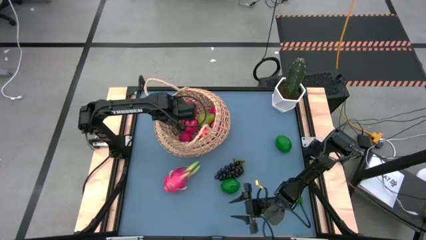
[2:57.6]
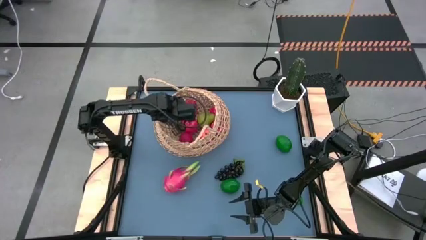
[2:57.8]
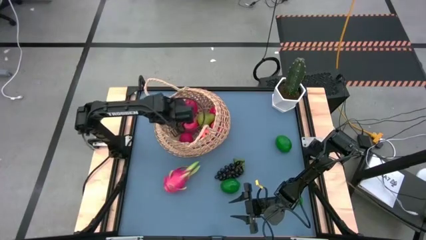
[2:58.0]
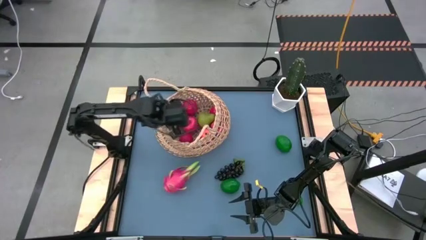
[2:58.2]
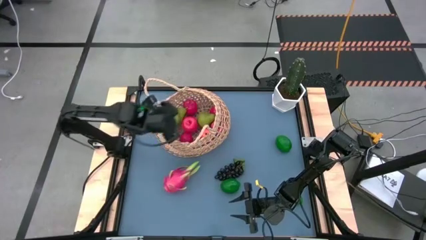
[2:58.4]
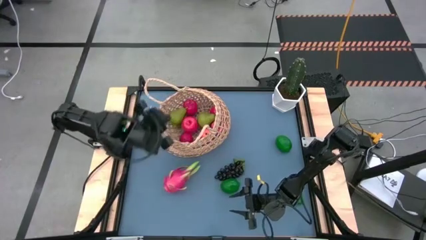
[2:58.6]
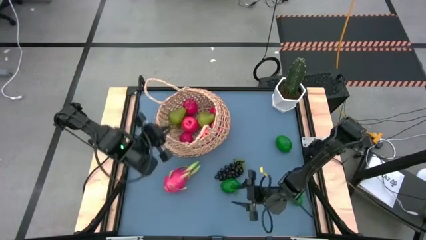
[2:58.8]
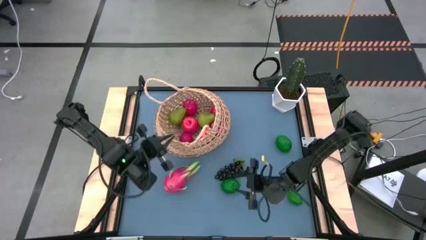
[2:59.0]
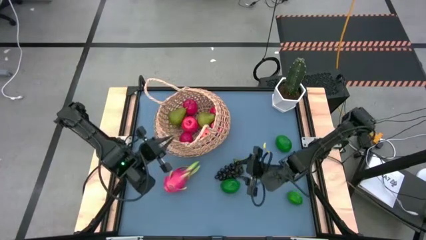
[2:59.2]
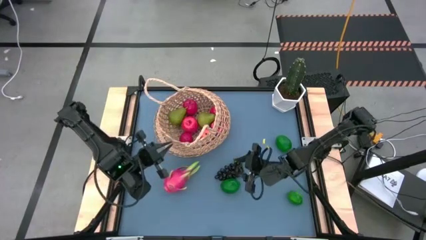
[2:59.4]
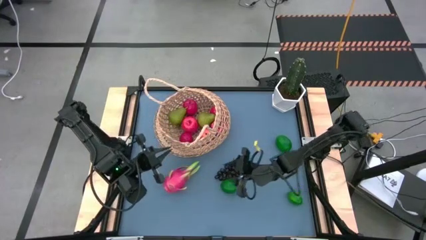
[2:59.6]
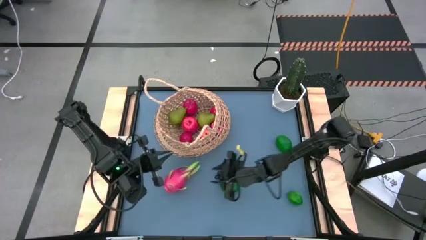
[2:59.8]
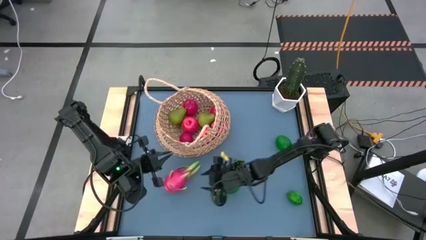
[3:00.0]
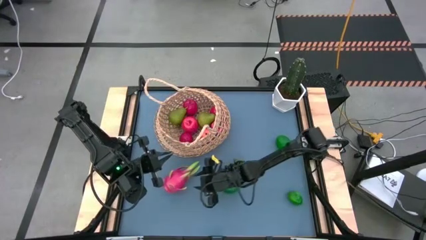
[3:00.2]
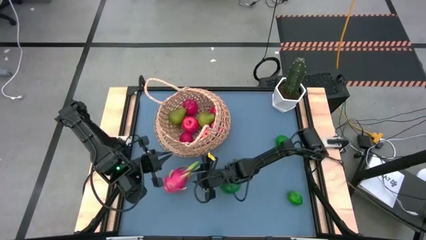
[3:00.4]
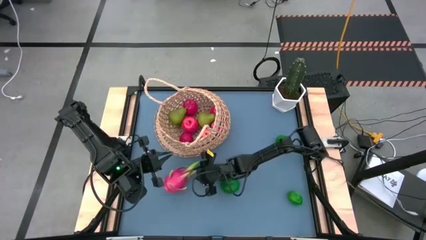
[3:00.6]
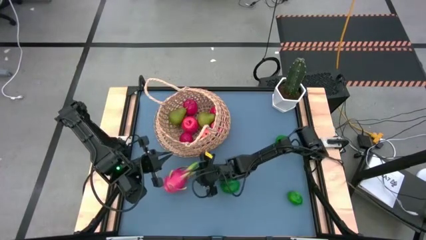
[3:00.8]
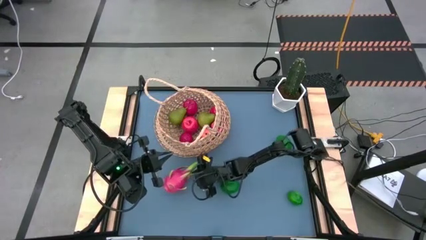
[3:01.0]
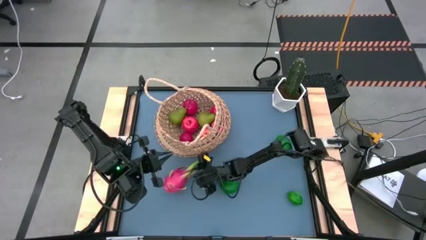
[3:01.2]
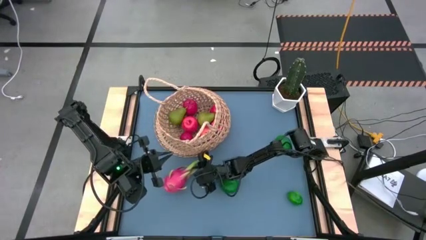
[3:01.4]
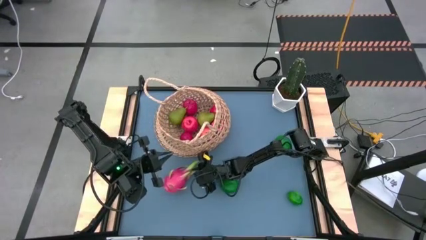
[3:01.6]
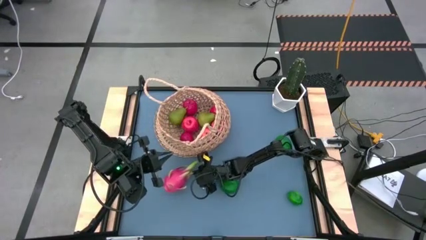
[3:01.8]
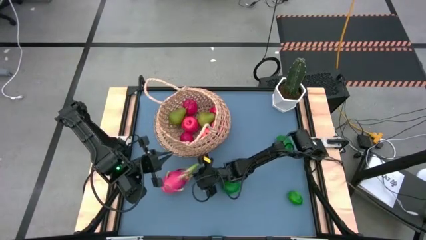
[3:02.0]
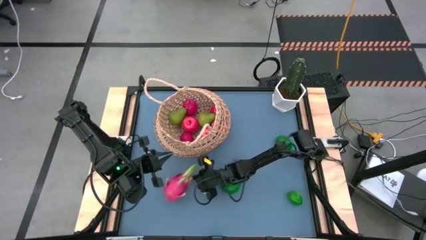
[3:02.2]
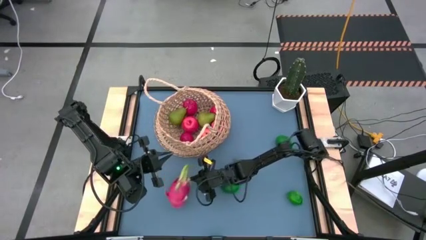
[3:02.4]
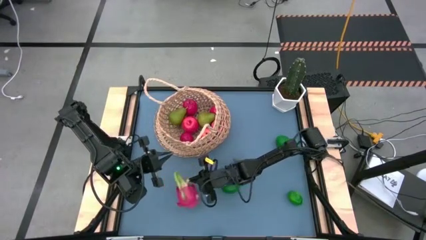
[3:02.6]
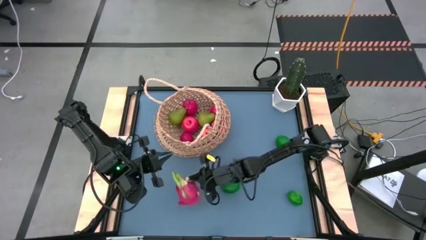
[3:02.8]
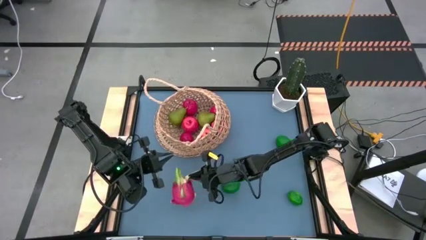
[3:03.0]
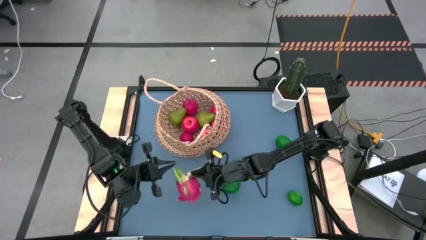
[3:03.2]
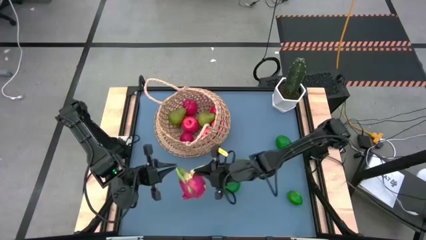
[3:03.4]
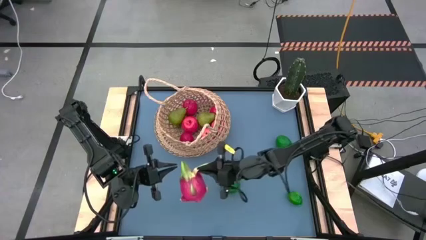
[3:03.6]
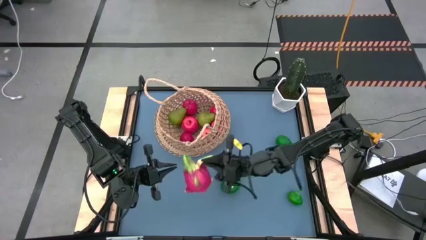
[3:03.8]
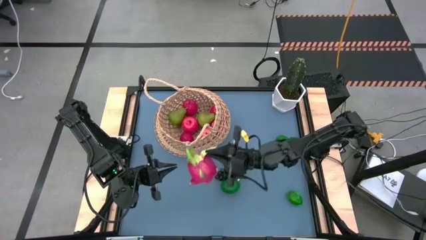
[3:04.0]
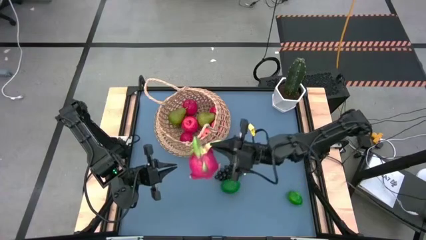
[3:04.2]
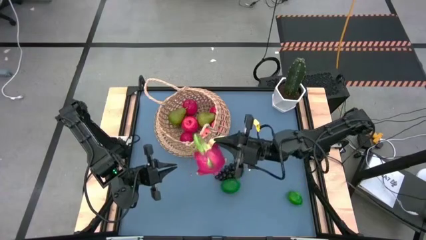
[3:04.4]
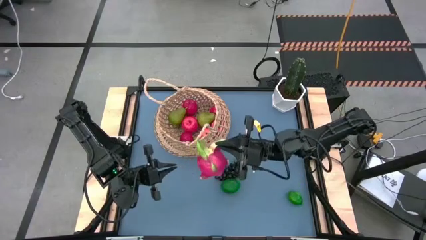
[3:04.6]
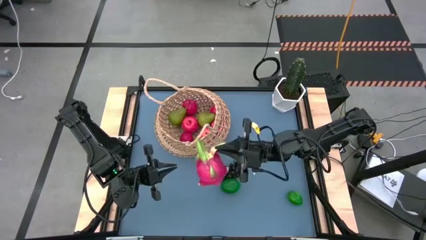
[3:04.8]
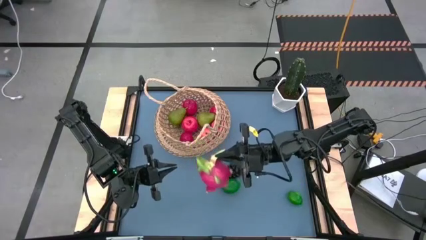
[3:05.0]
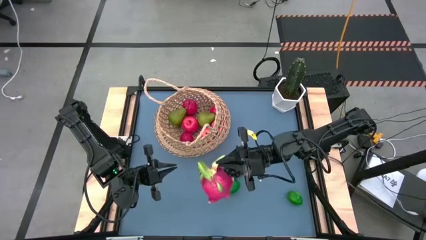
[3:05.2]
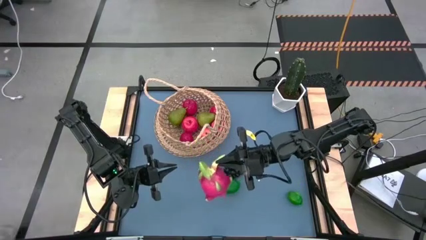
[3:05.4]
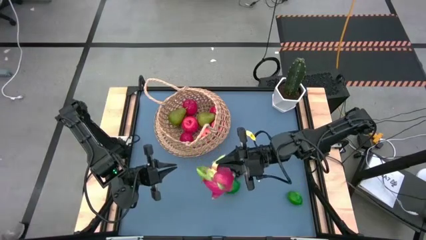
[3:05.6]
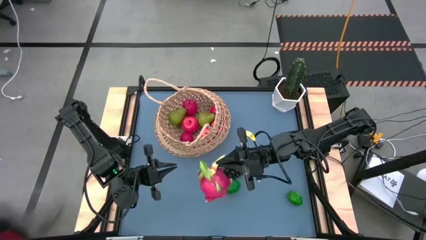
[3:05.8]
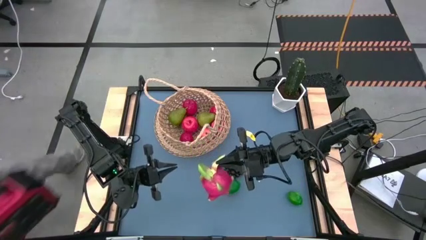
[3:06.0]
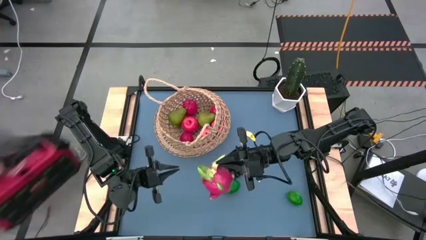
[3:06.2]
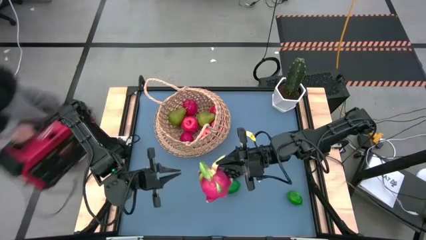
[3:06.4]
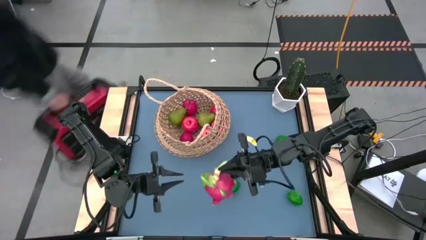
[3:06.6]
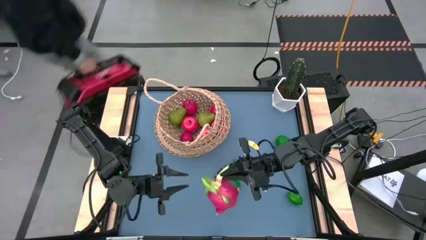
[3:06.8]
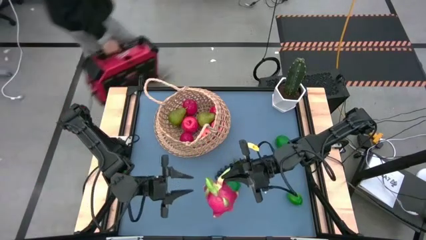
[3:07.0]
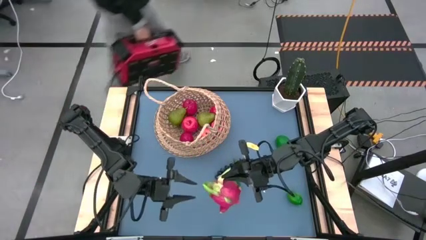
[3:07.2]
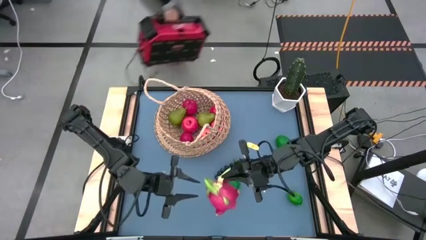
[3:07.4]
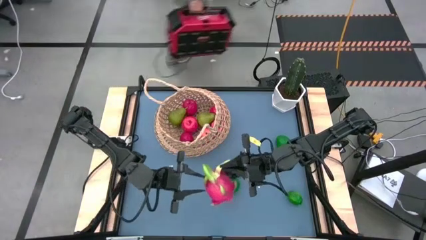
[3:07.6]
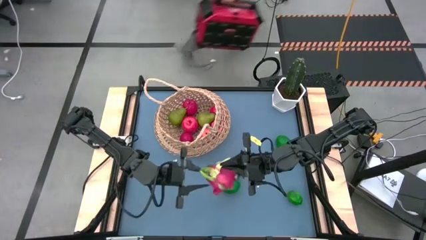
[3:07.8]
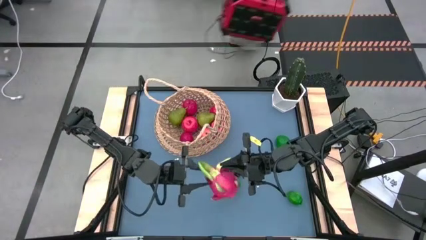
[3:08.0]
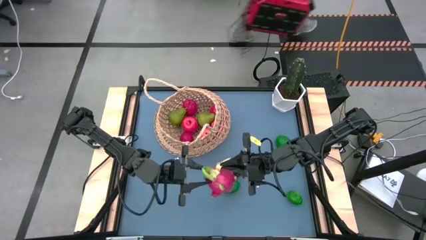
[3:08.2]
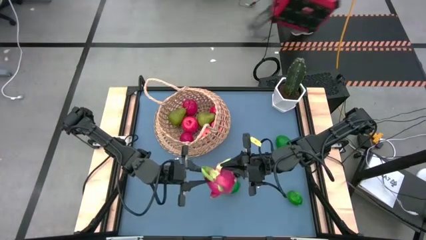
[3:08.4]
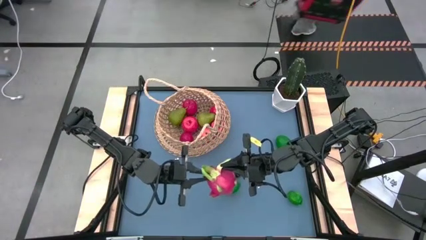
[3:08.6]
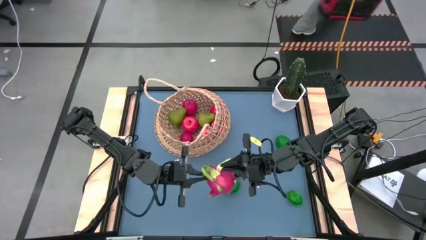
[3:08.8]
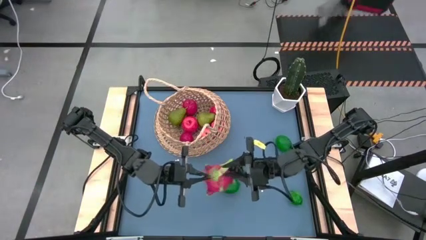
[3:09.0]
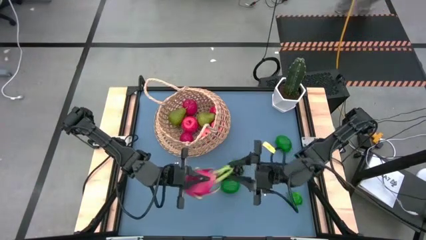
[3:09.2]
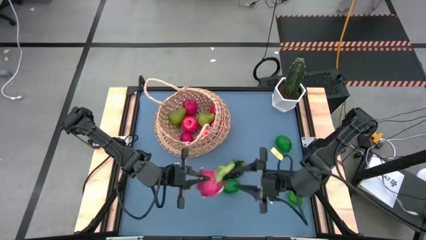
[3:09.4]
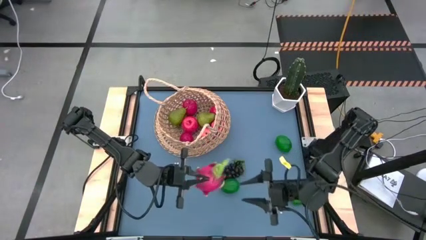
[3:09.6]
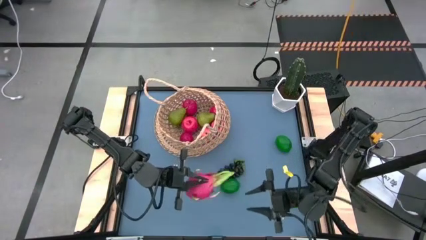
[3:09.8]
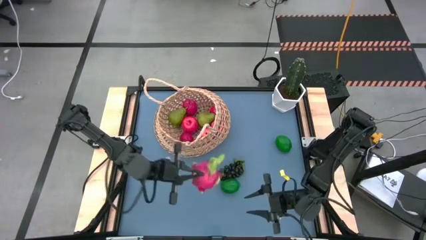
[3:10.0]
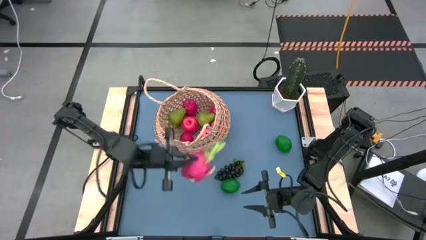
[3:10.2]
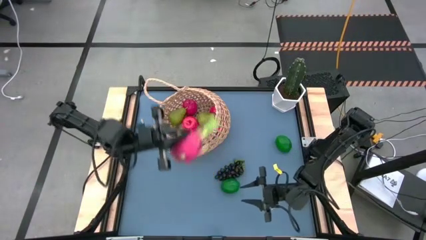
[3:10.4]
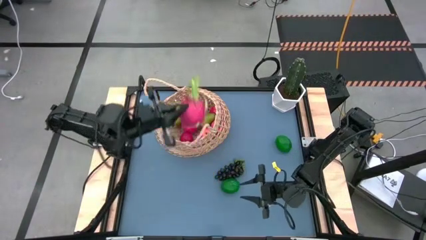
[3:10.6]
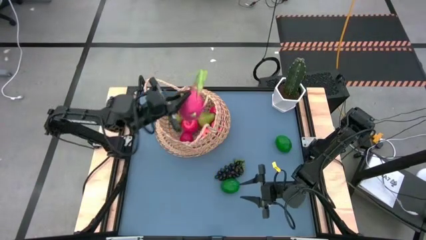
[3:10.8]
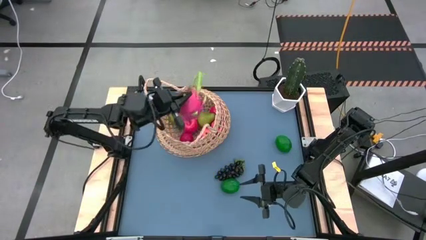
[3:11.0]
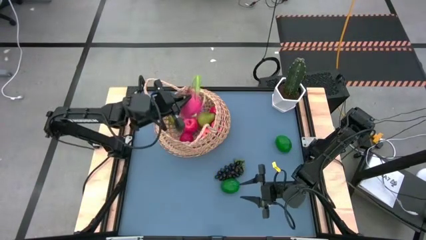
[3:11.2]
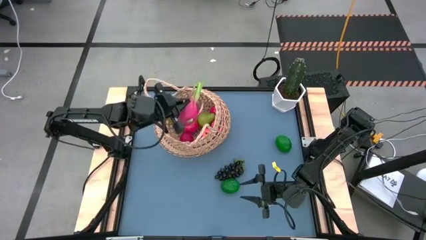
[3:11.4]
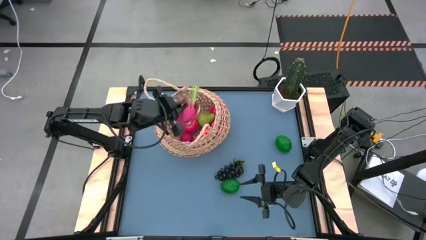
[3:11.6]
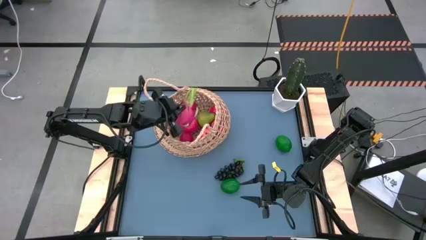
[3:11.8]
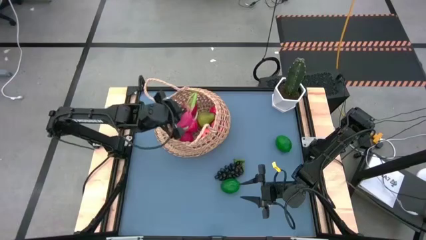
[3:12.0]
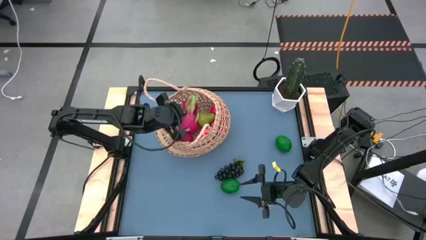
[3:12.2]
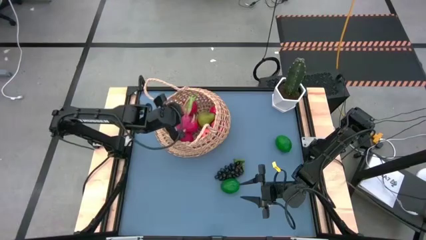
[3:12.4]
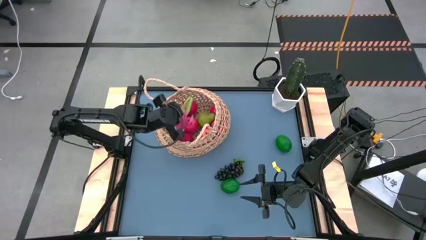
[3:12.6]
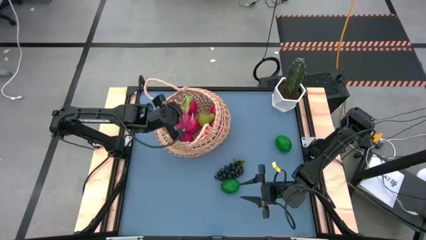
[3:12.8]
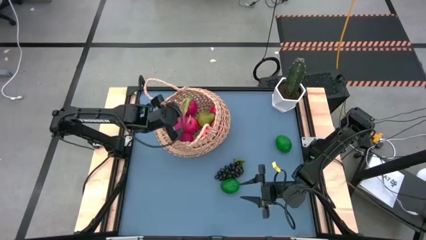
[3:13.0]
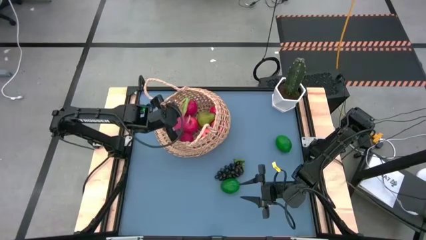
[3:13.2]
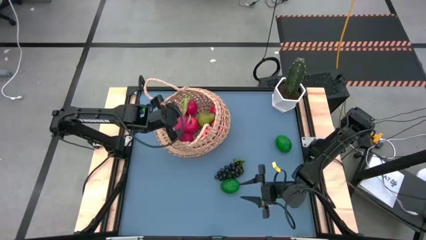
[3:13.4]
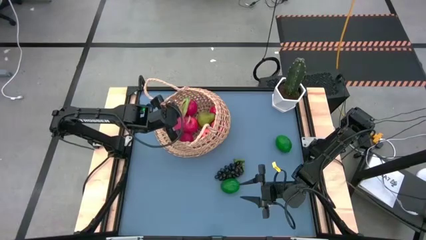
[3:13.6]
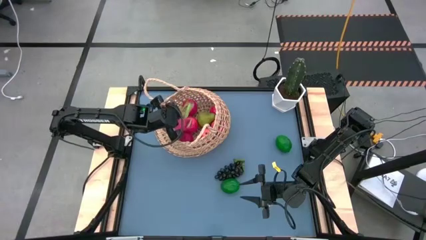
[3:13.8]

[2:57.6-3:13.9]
Task: Build produce basket
Put the pink dragon fruit into the basket
